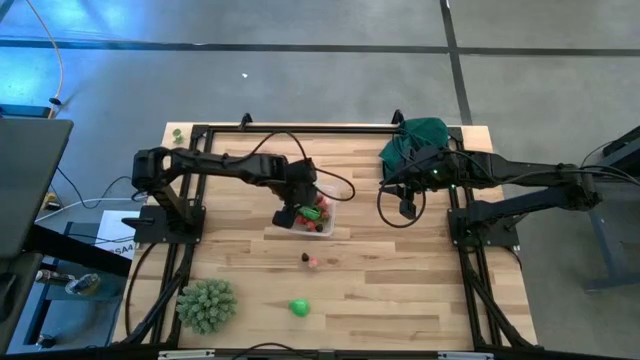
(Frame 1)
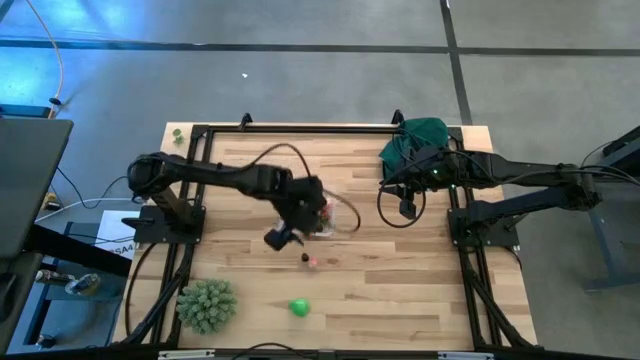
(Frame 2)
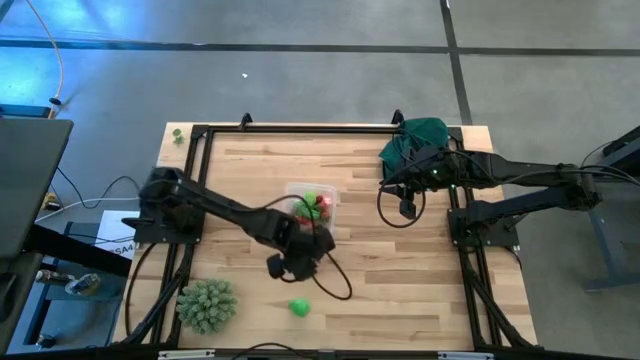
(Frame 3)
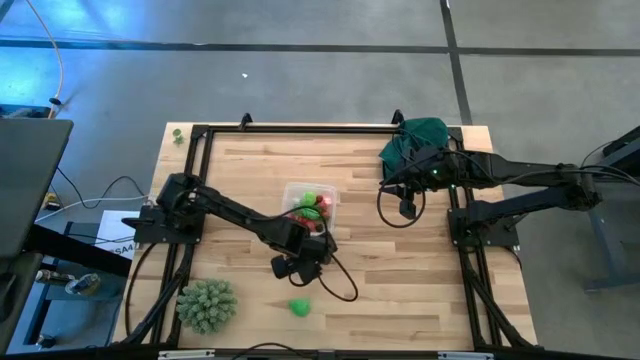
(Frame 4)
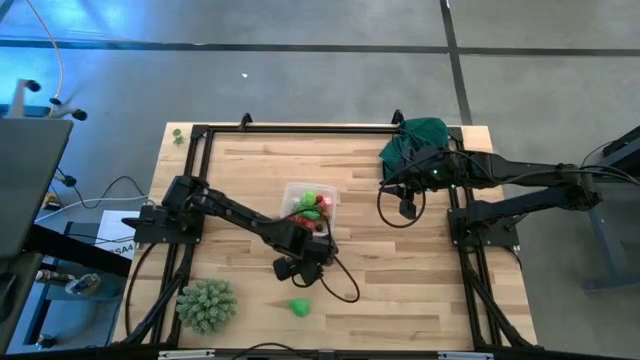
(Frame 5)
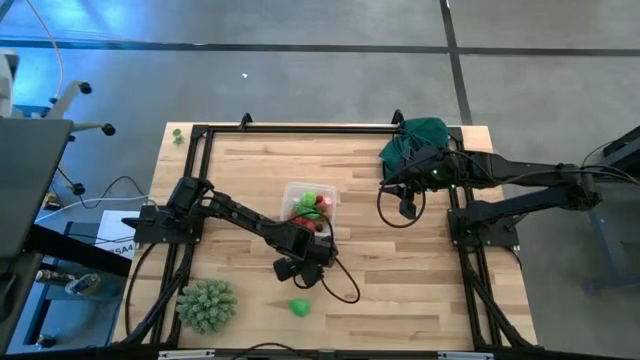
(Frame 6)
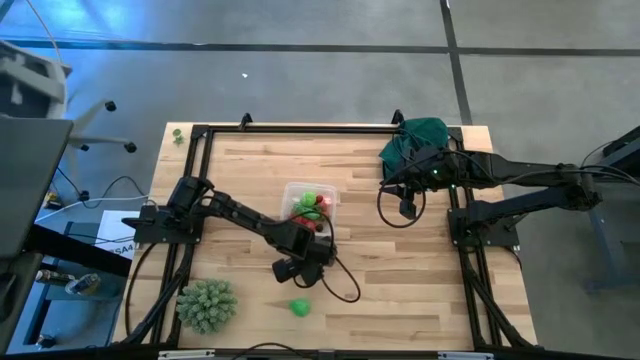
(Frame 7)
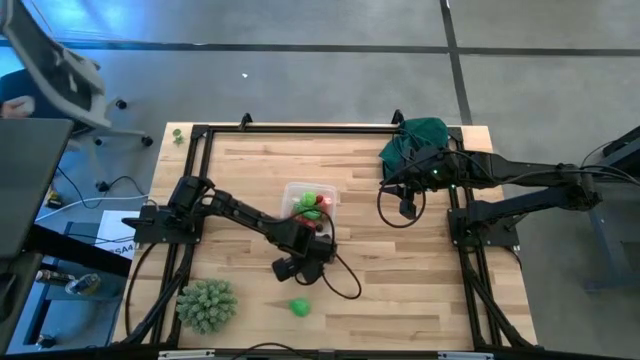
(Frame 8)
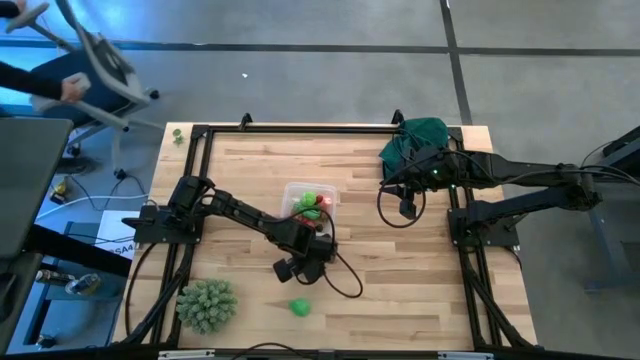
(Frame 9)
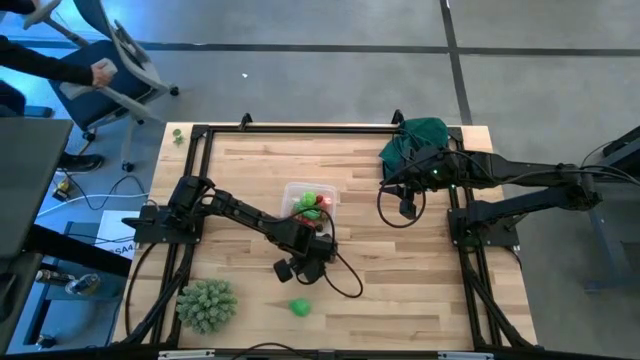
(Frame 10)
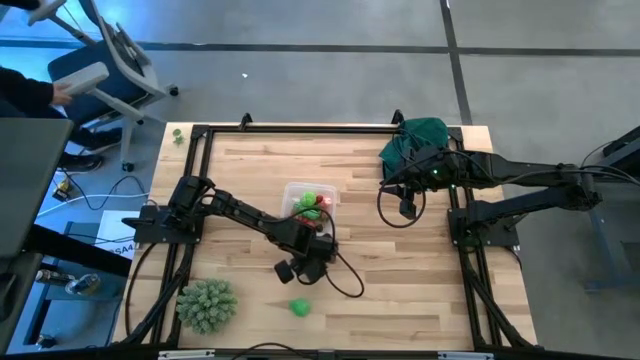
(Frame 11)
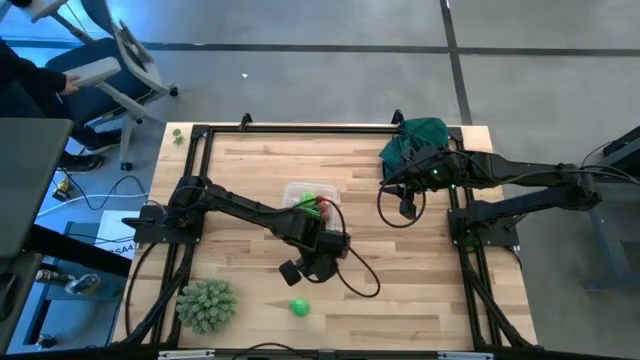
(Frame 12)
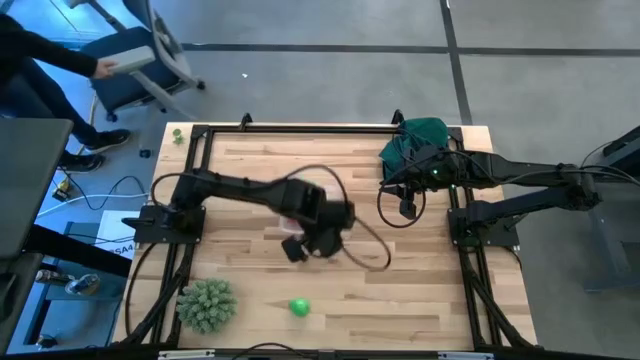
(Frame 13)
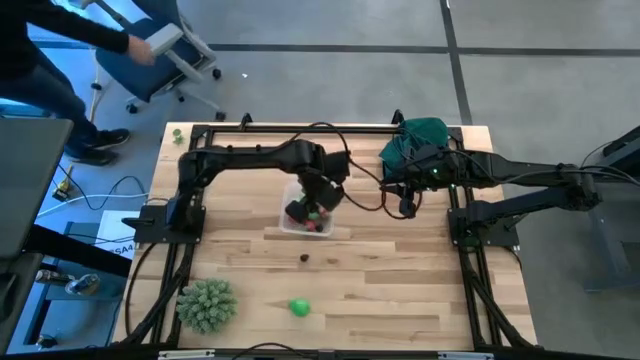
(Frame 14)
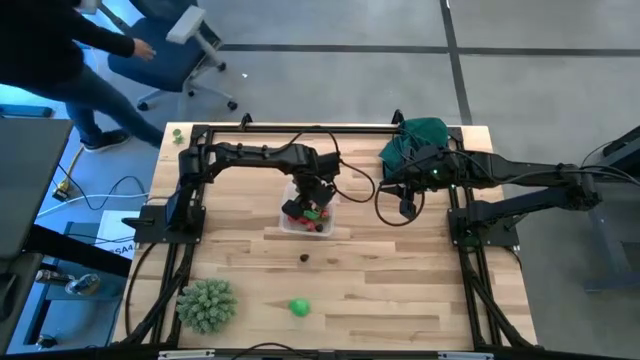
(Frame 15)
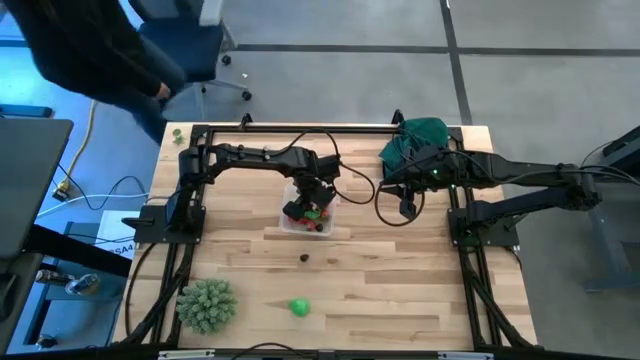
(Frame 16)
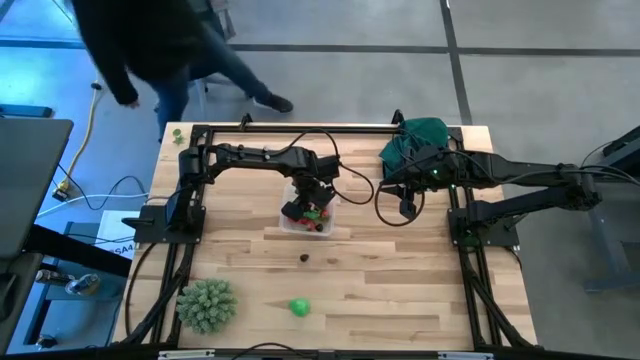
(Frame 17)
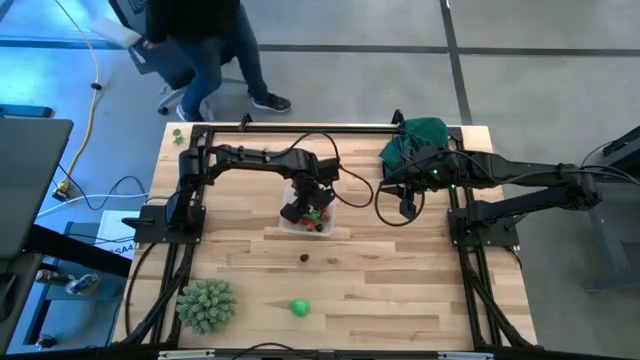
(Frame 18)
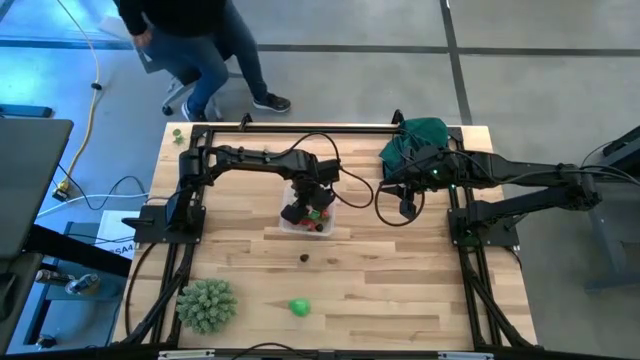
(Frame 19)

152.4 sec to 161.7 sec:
Task: Pick and placing Produce into tupperware
Put the pink peach into the transparent container

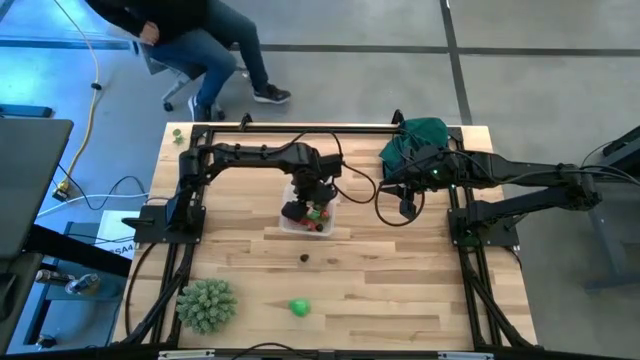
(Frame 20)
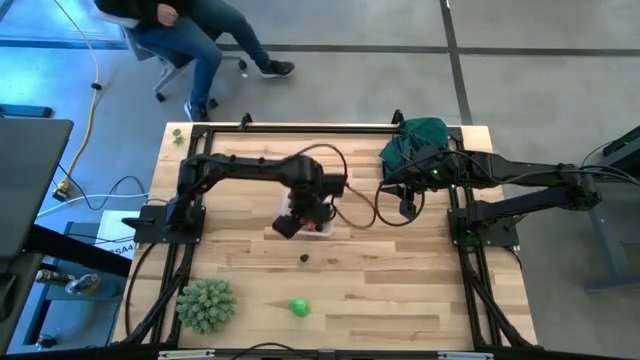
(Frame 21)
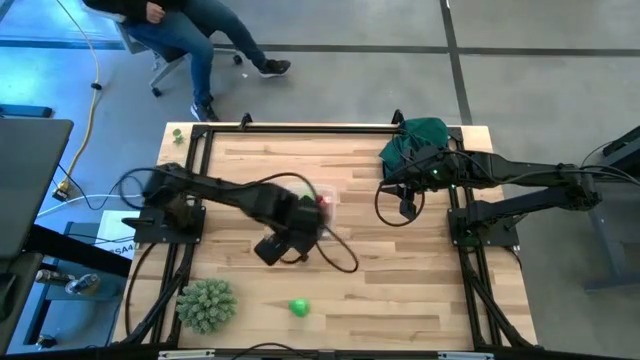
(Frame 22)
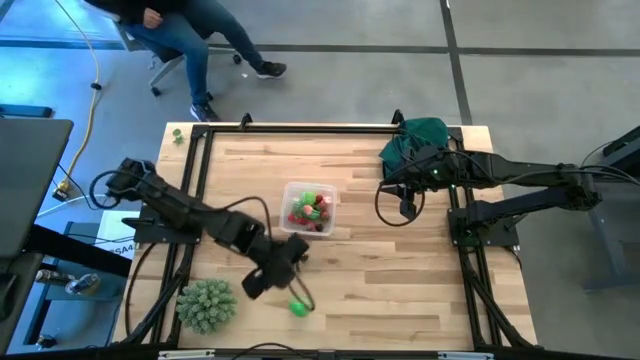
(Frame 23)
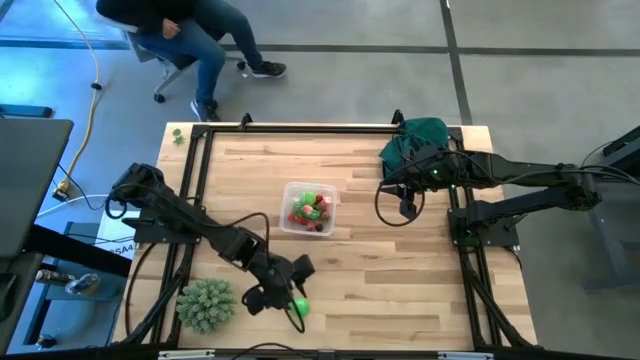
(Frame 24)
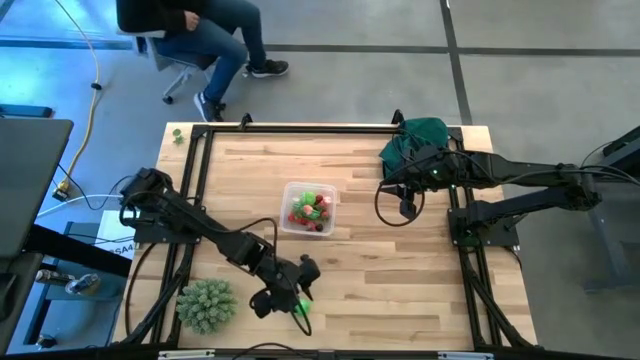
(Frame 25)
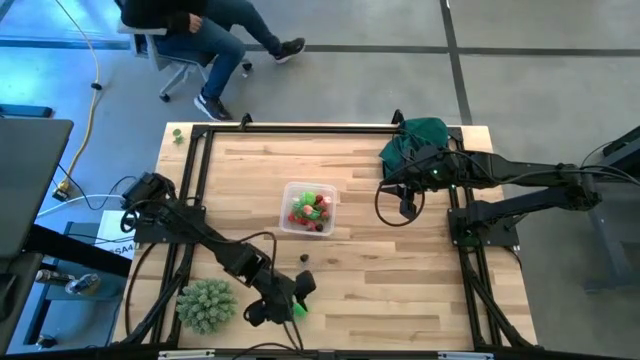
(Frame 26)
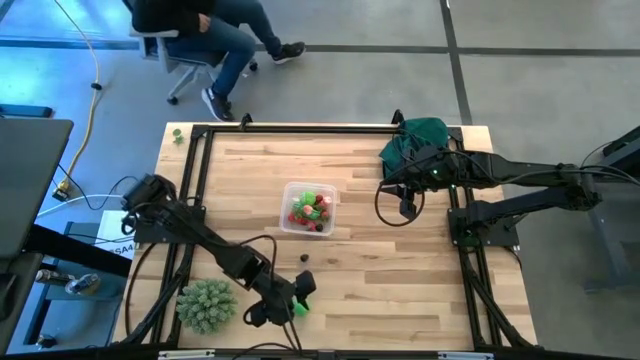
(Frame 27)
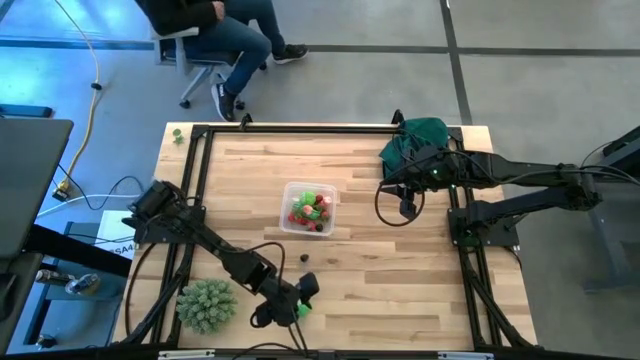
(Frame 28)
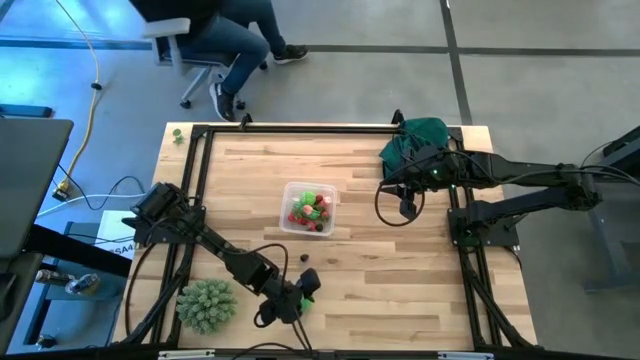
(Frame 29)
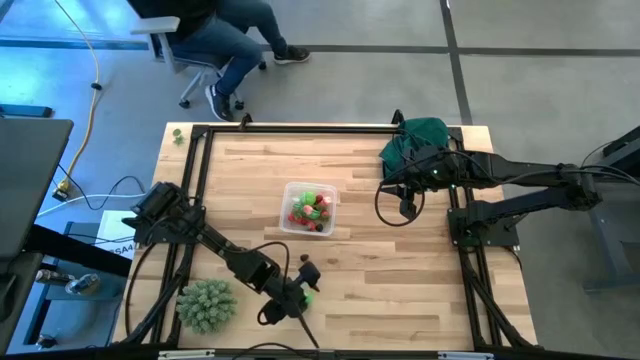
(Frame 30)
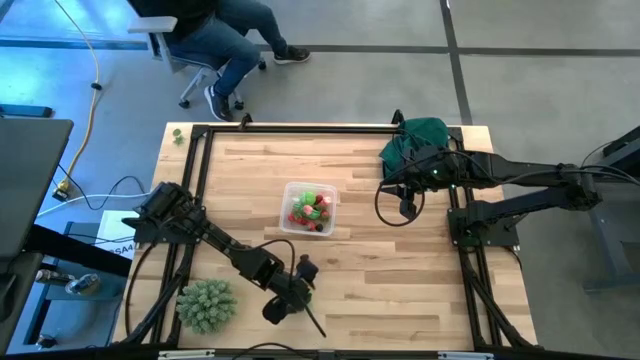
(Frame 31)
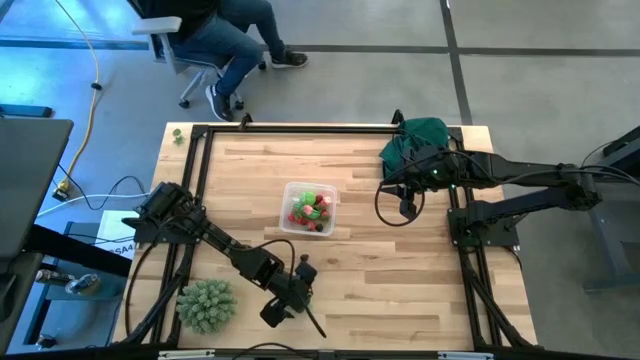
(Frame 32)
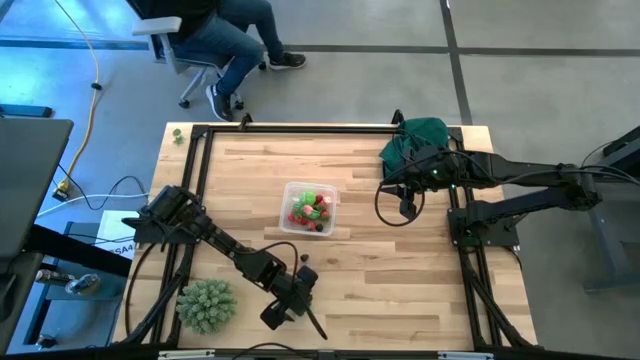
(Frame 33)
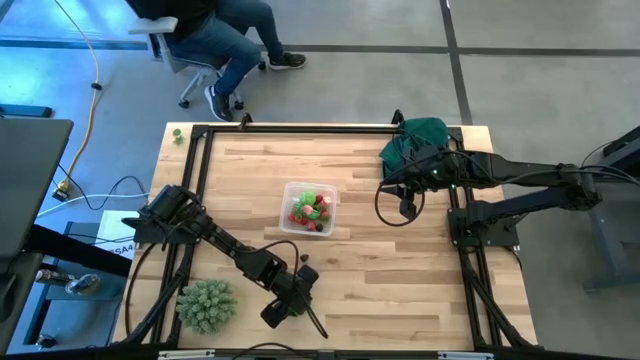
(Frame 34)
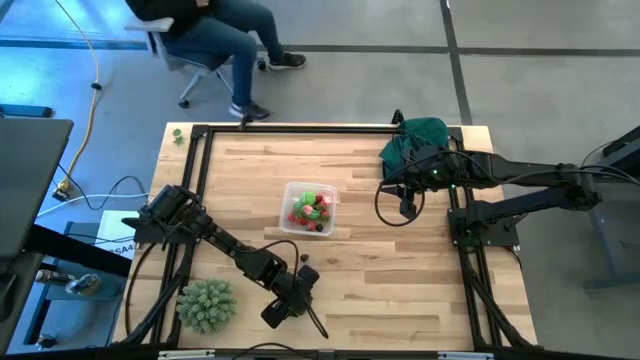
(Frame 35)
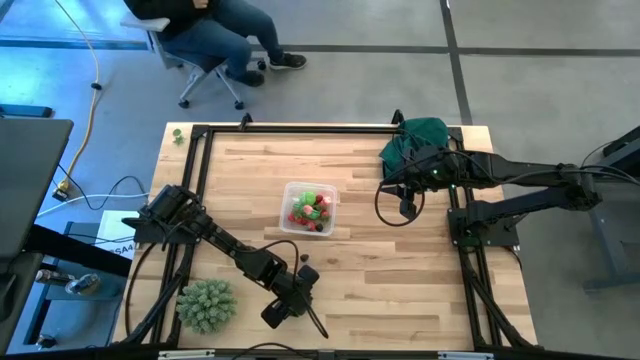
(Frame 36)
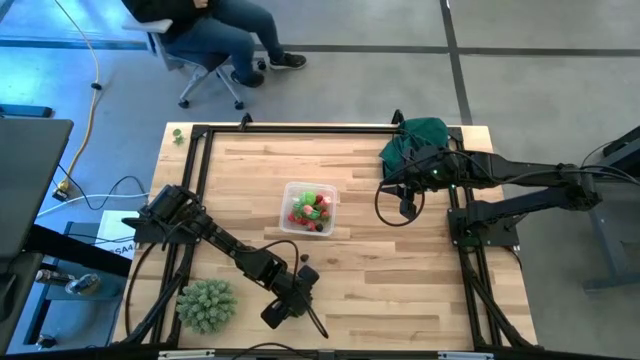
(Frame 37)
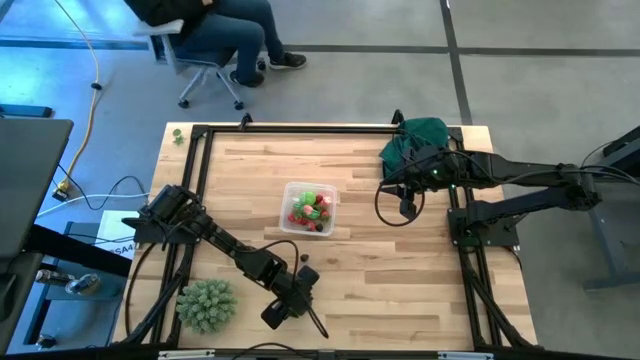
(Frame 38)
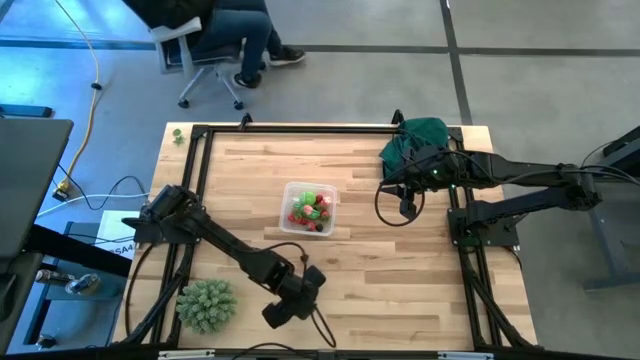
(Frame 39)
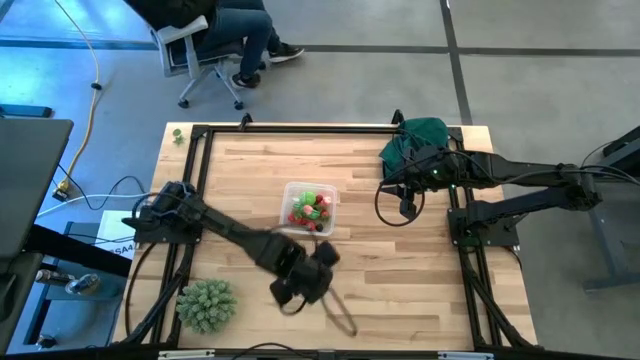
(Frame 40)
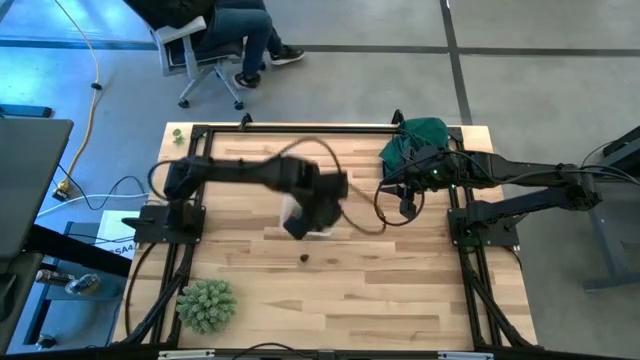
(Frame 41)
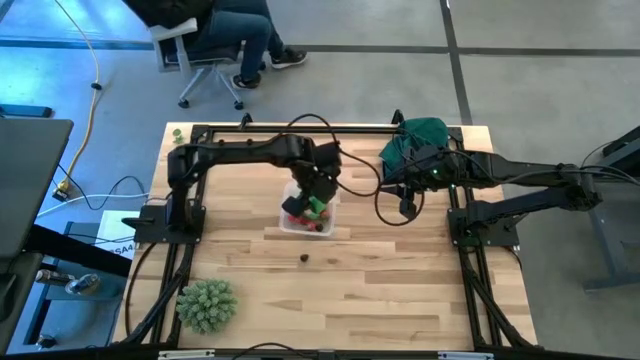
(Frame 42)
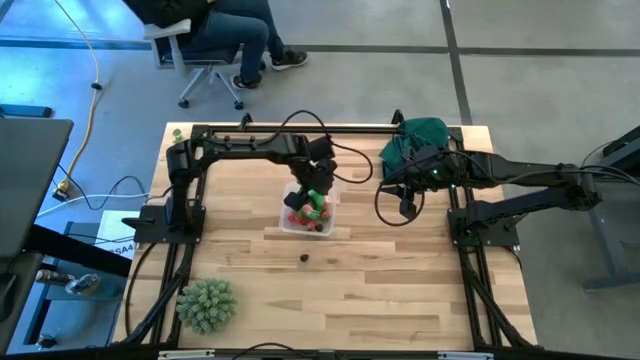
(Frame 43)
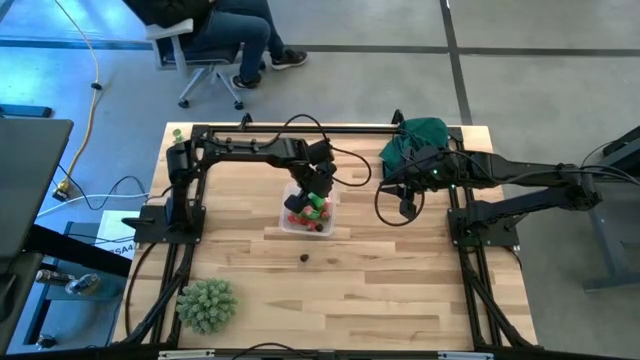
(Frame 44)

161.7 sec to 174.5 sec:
Put the green pear into the transparent container
